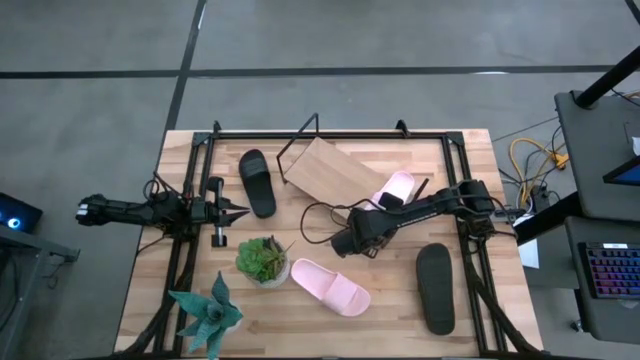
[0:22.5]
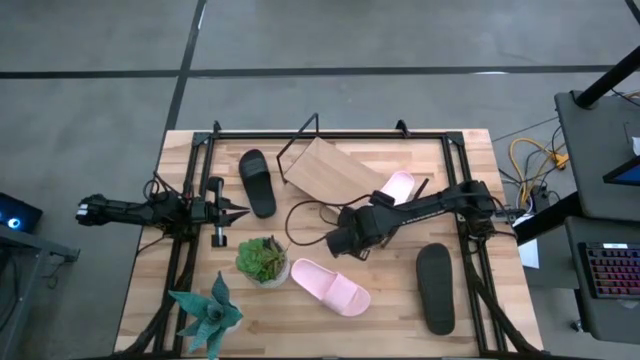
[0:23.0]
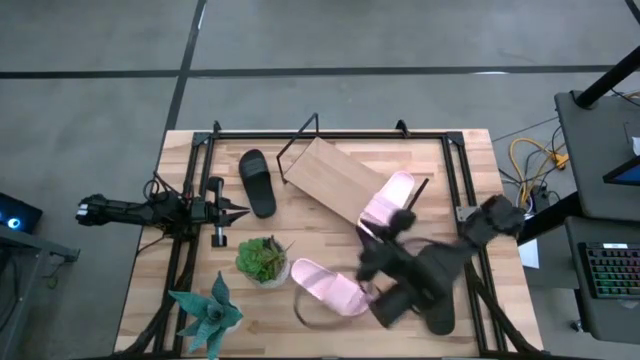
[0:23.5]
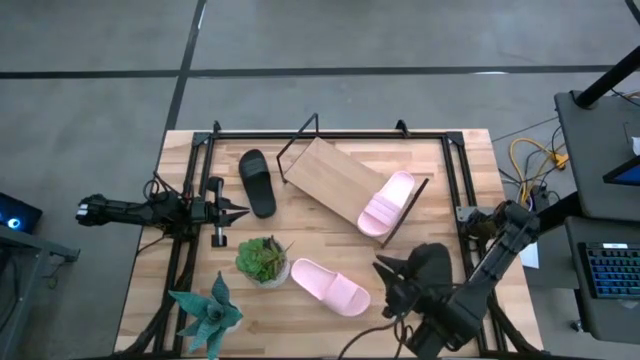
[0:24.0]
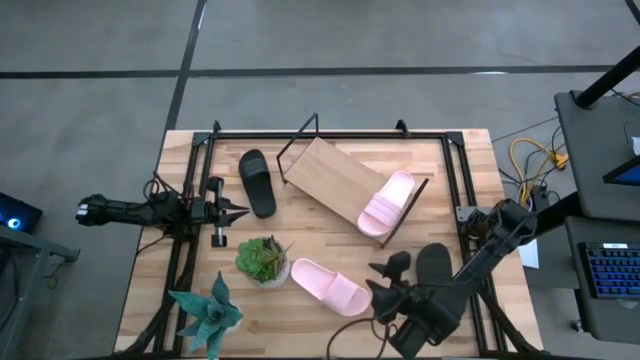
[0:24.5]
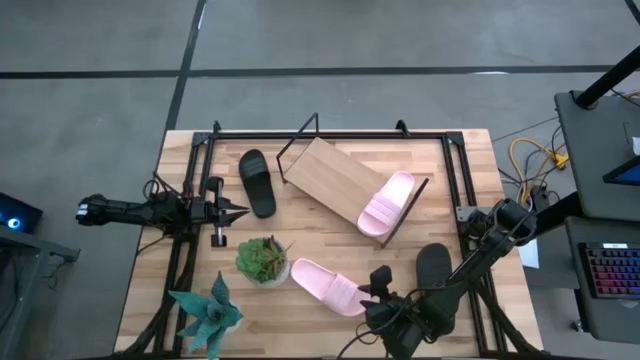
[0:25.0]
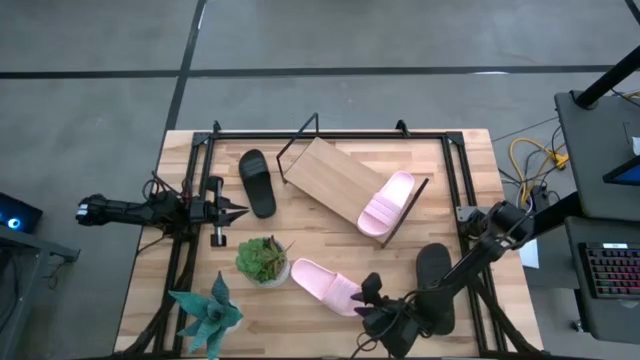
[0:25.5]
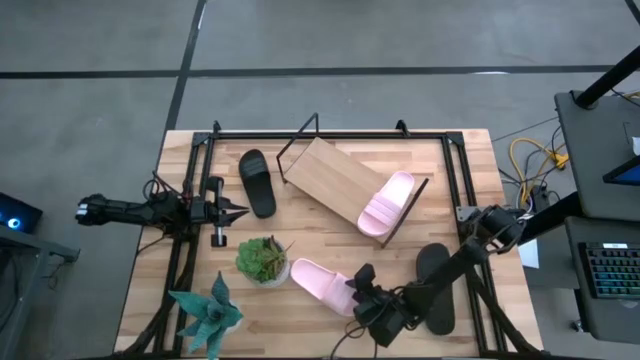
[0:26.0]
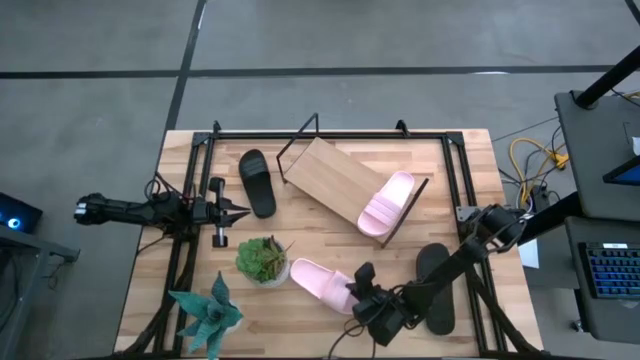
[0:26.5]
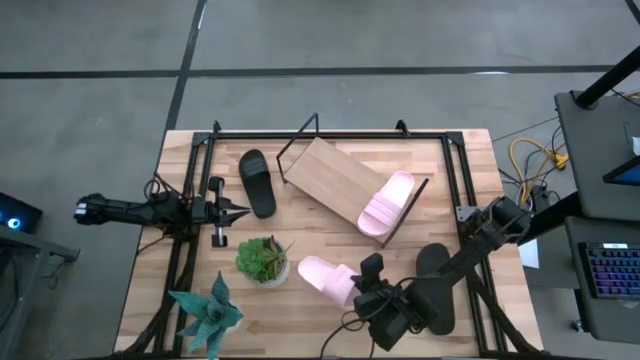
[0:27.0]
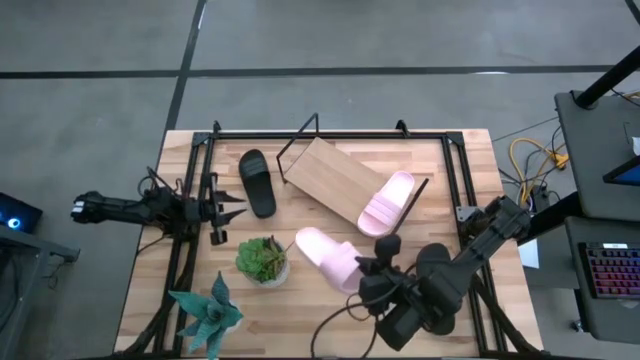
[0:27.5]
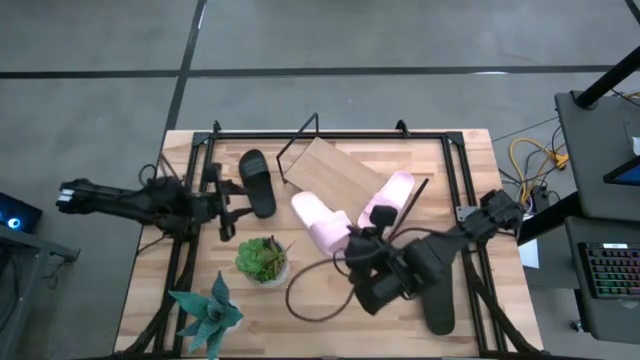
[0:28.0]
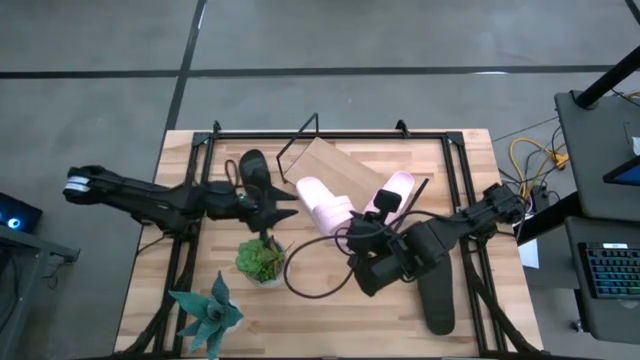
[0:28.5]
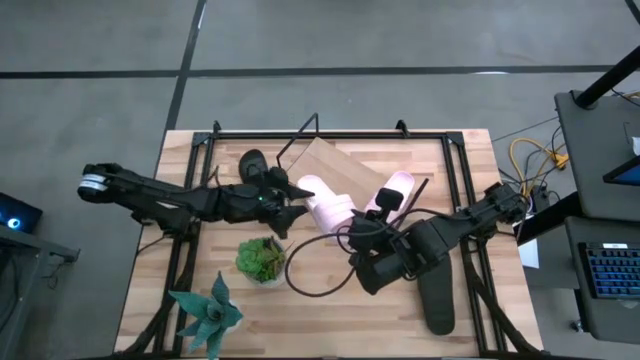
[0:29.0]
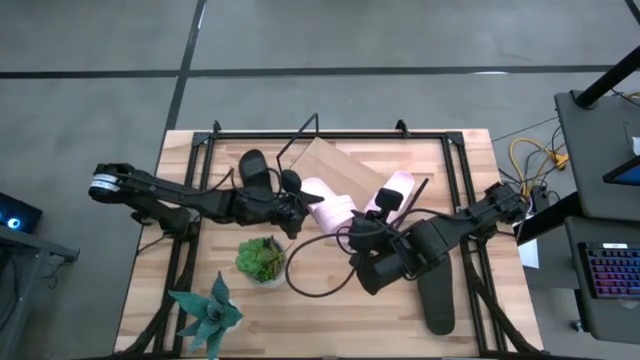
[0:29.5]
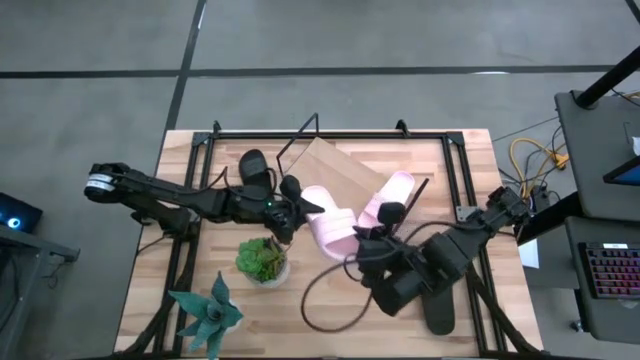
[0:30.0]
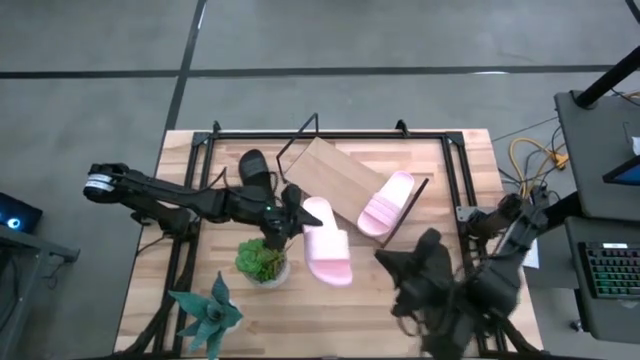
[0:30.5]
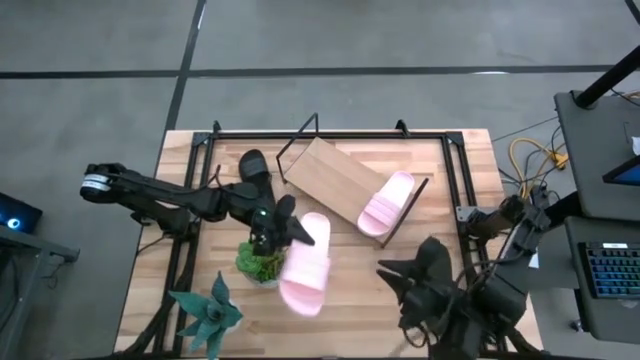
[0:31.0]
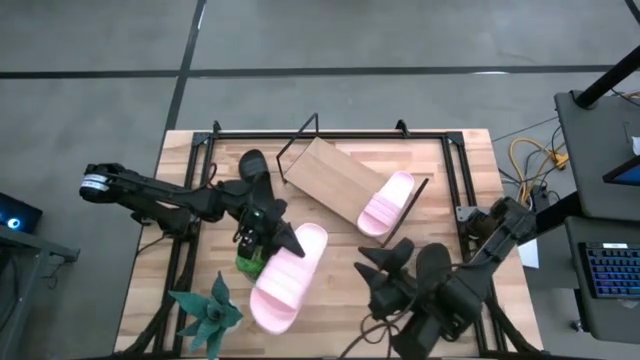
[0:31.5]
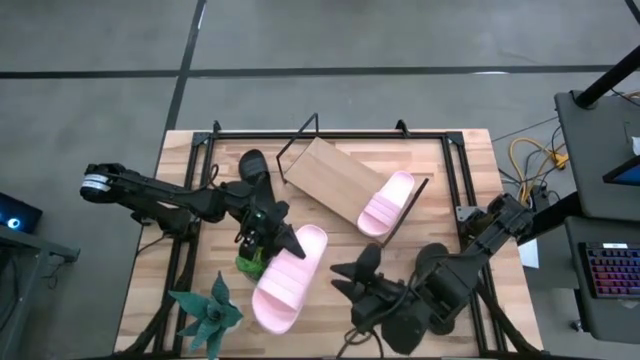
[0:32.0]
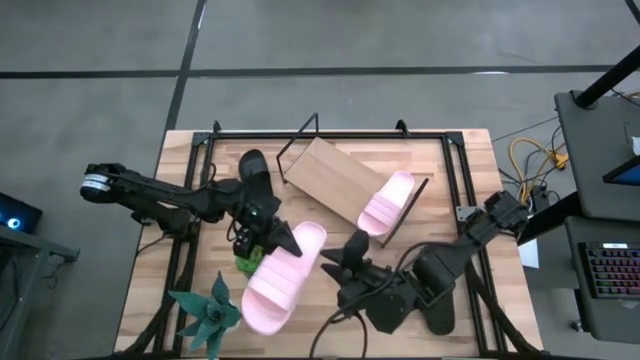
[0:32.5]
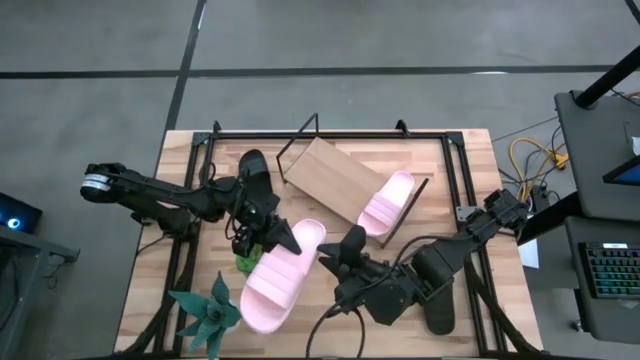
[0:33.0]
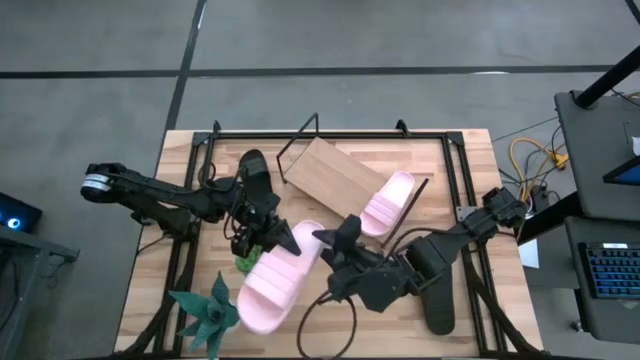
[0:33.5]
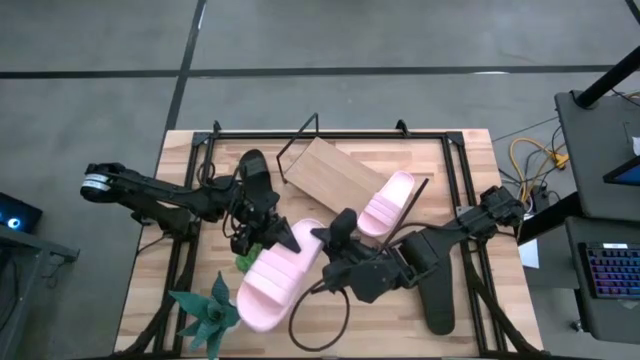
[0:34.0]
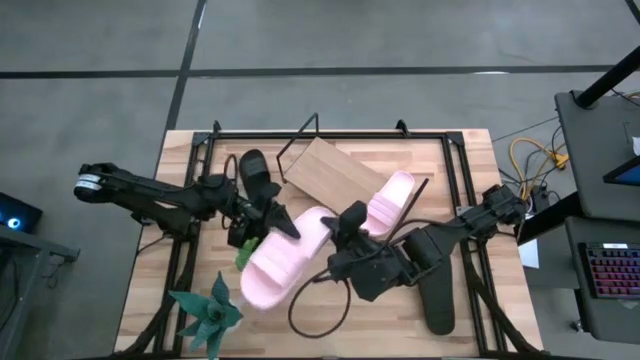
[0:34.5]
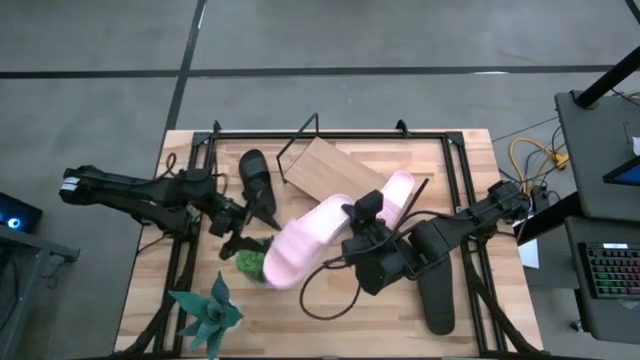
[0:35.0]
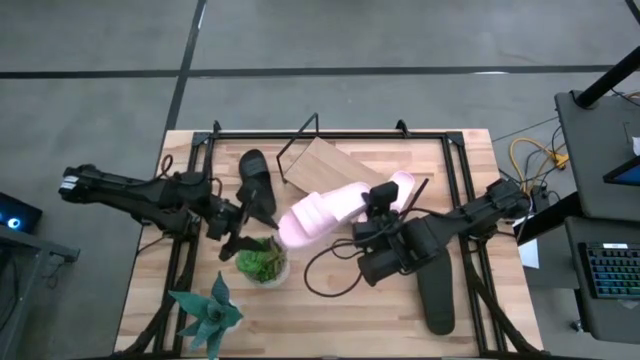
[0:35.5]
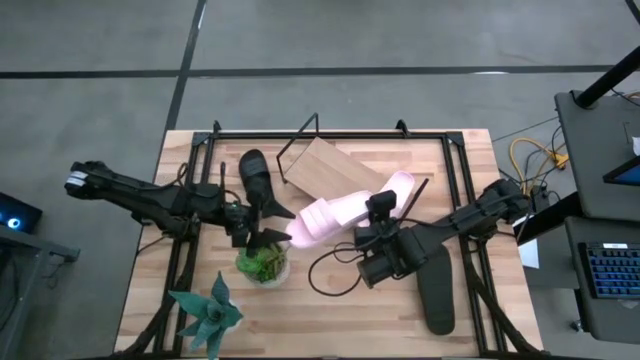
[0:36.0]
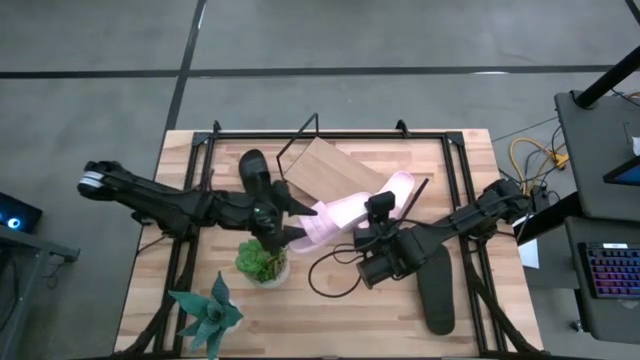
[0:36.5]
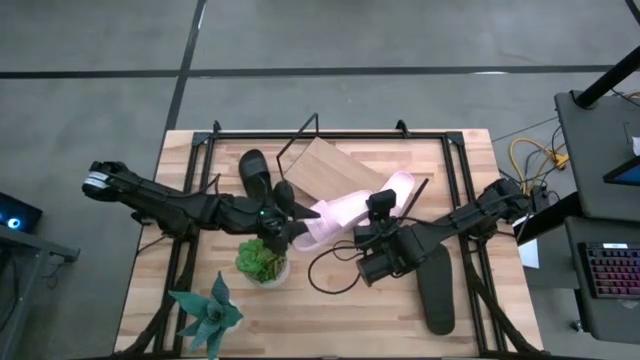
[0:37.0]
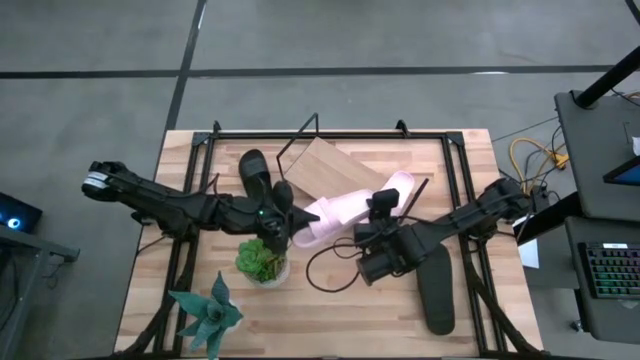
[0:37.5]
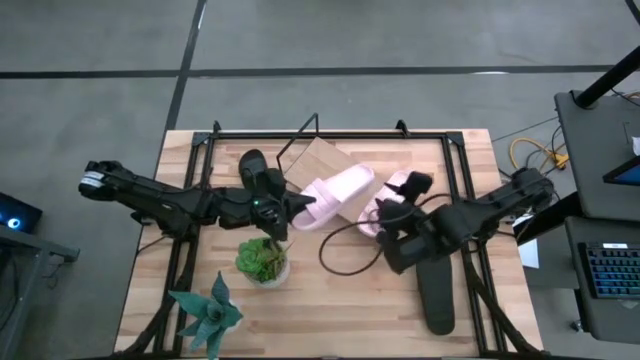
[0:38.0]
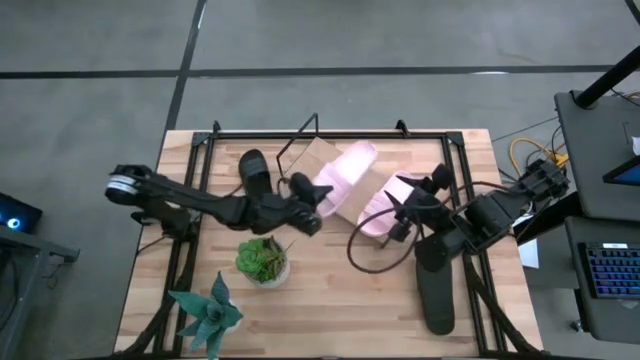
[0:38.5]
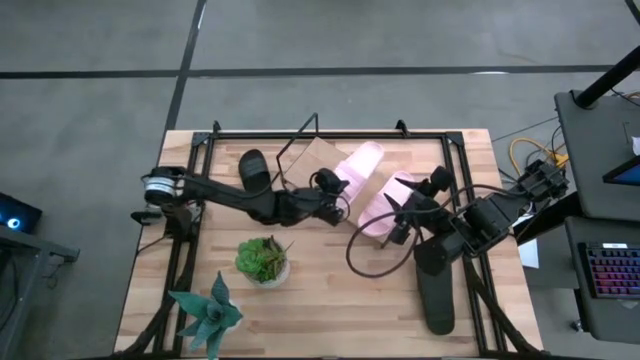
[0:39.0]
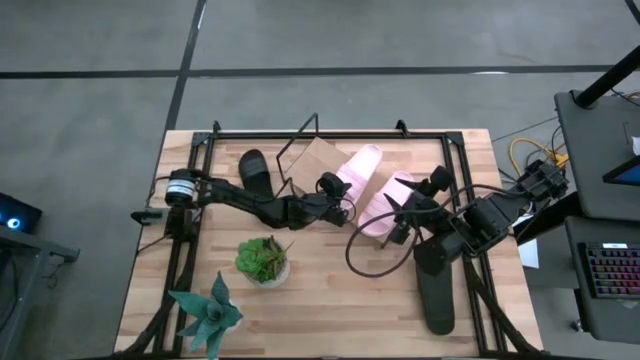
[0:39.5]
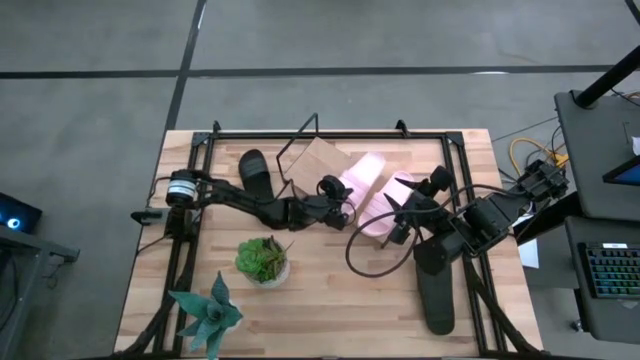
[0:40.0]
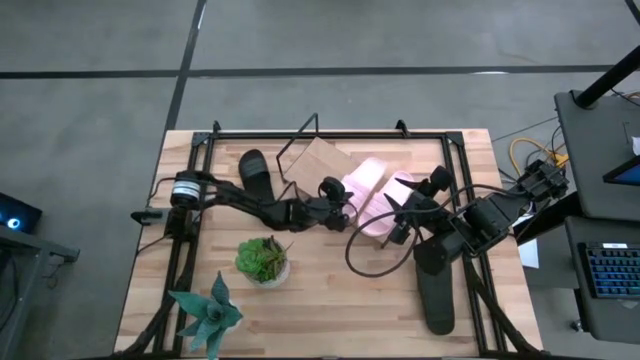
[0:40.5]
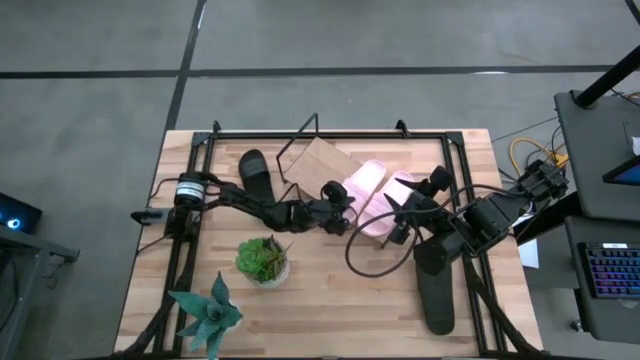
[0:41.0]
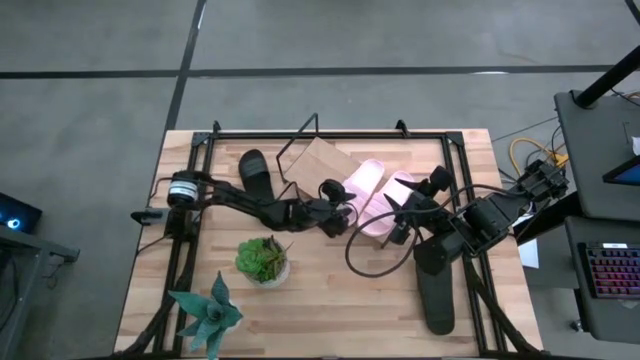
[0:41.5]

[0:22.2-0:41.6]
Task: Pick and place slides into the shelf
Put the pink slide on the shelf

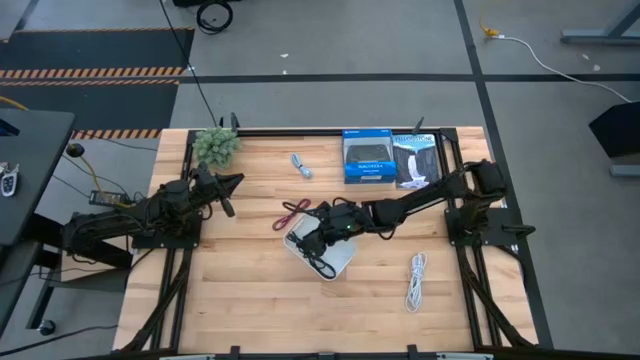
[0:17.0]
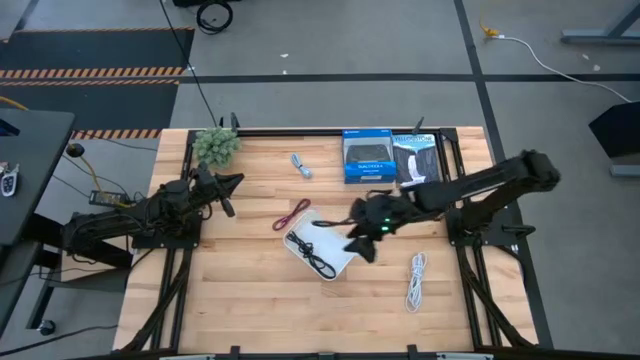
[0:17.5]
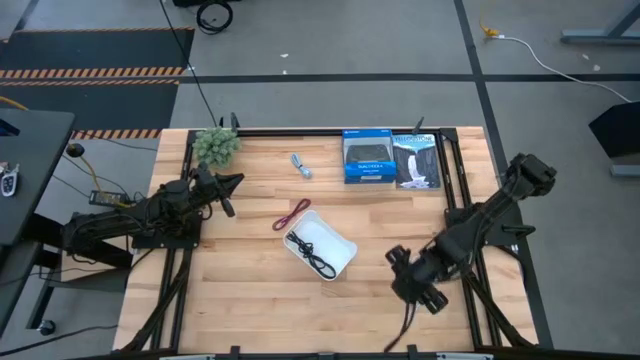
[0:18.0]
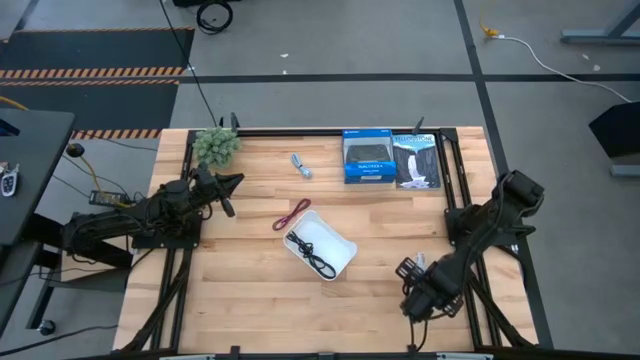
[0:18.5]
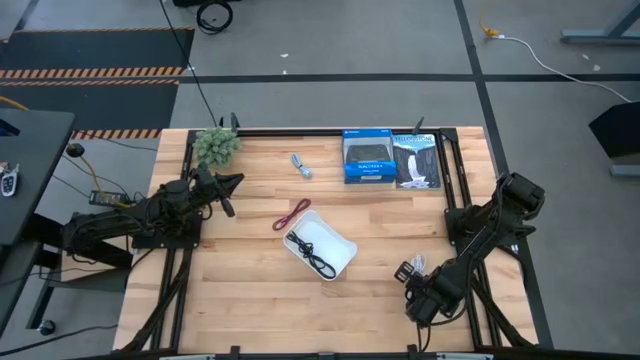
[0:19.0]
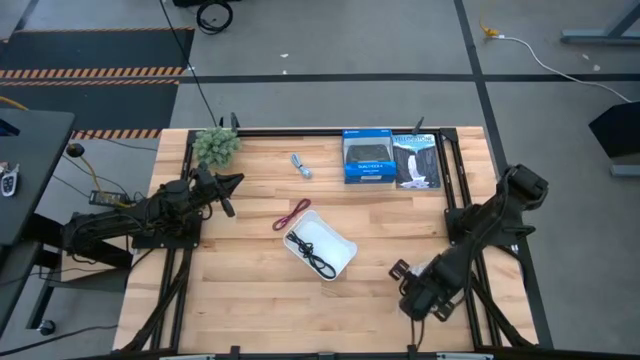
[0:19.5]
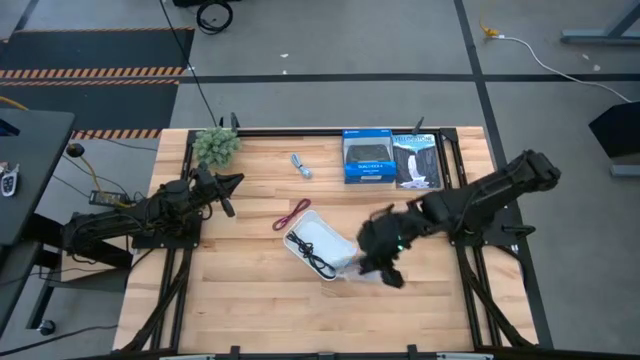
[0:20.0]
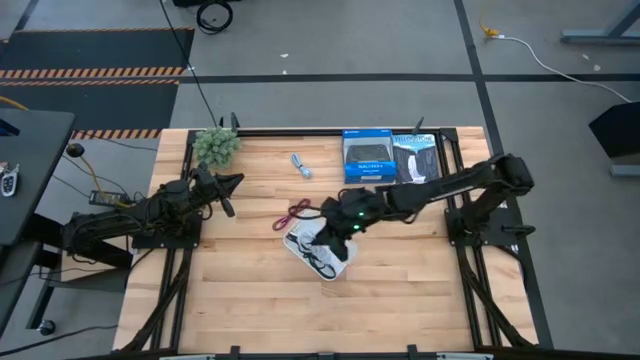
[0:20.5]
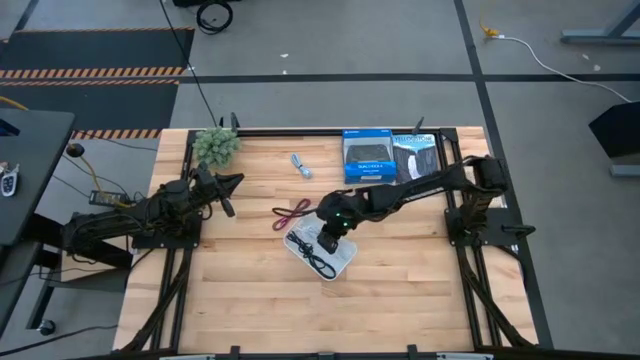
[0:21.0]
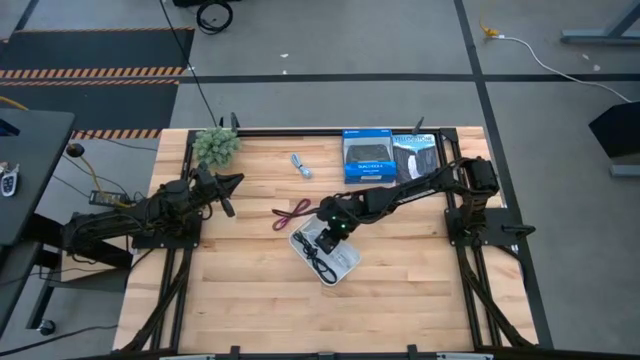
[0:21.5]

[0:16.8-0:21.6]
Task: Pick and place USB-C Cables
Put the white charger cable into the white bin
